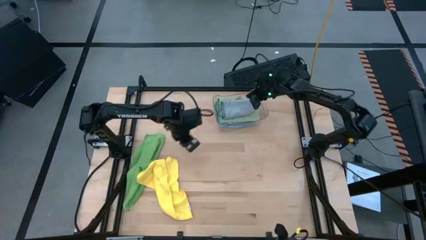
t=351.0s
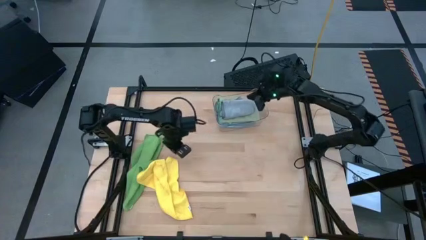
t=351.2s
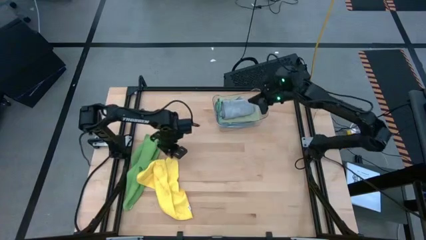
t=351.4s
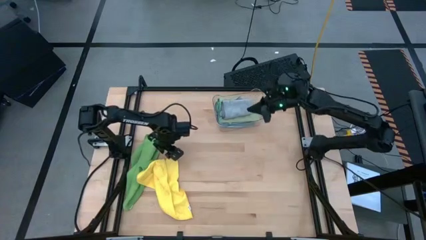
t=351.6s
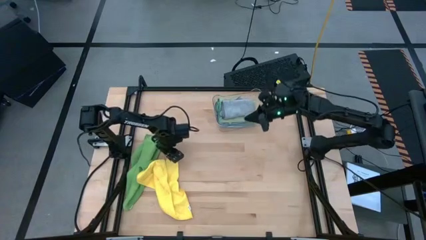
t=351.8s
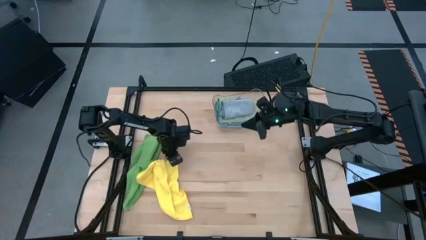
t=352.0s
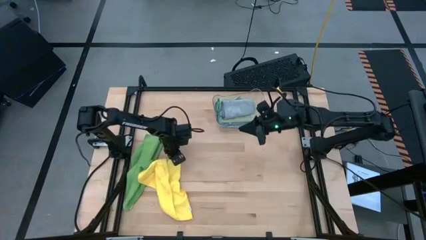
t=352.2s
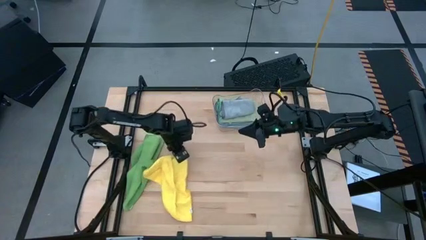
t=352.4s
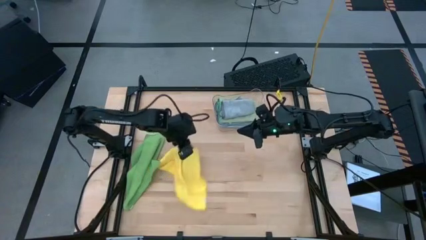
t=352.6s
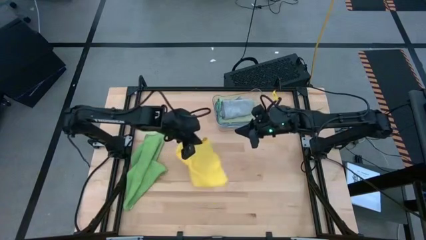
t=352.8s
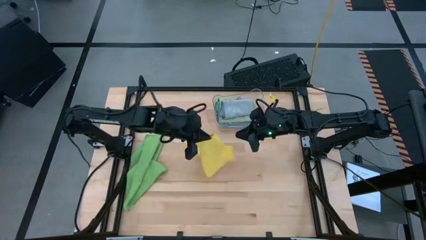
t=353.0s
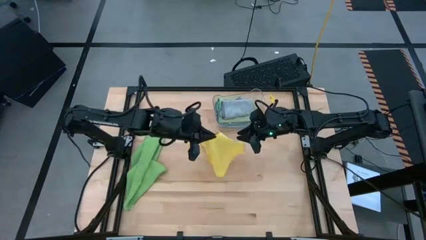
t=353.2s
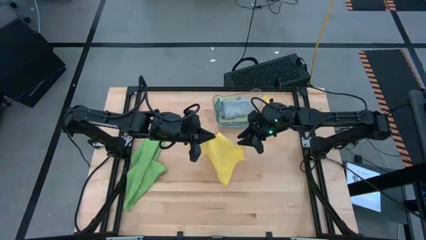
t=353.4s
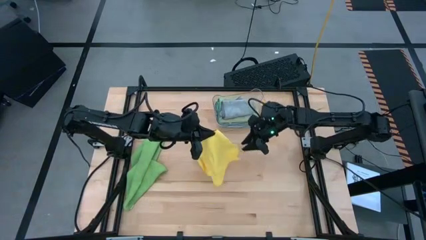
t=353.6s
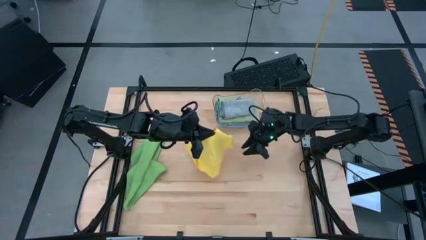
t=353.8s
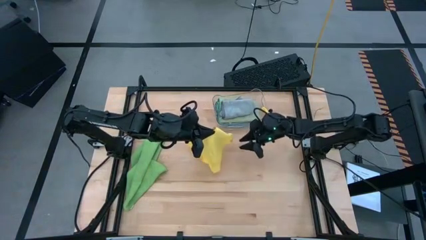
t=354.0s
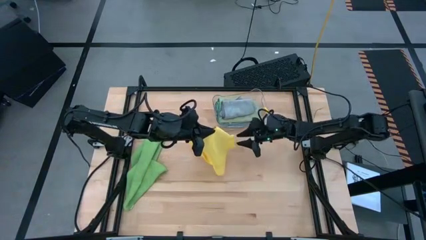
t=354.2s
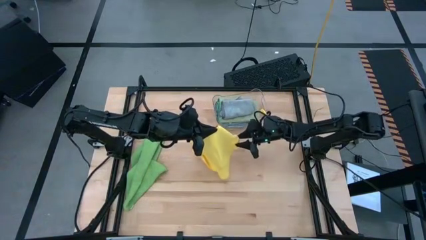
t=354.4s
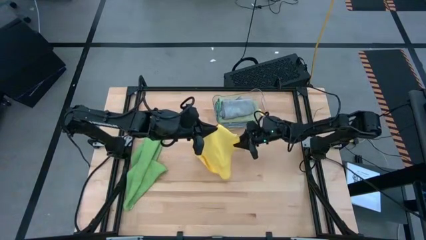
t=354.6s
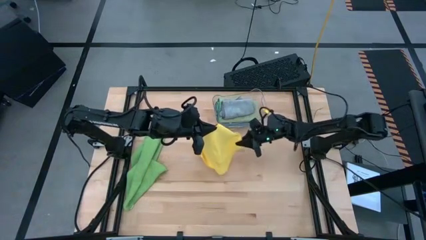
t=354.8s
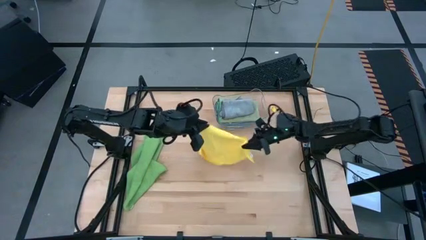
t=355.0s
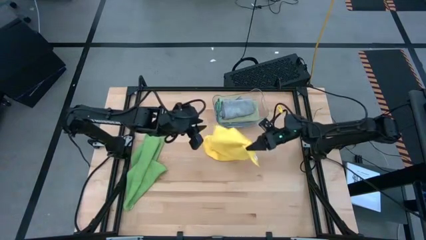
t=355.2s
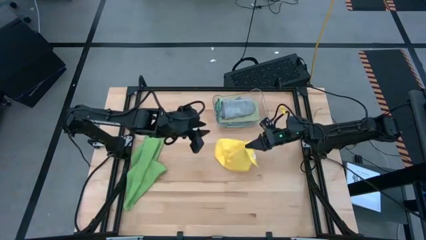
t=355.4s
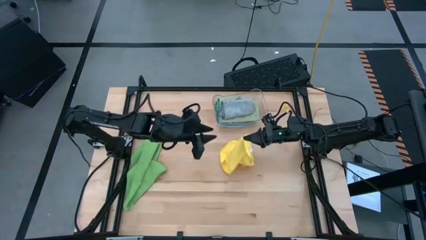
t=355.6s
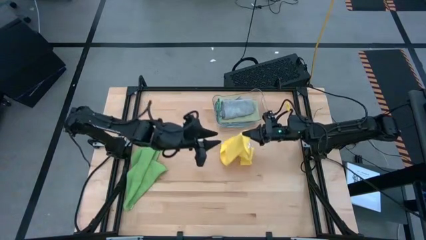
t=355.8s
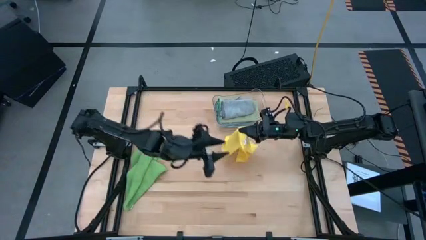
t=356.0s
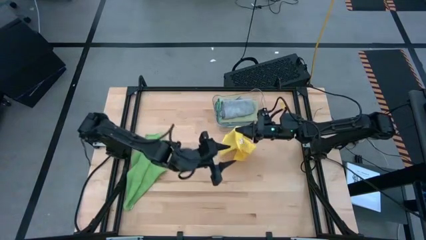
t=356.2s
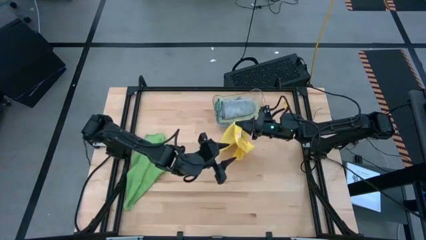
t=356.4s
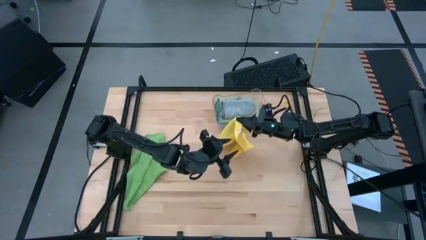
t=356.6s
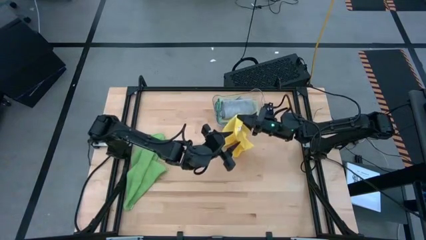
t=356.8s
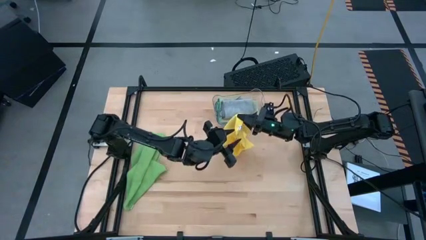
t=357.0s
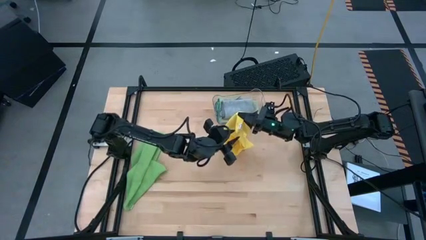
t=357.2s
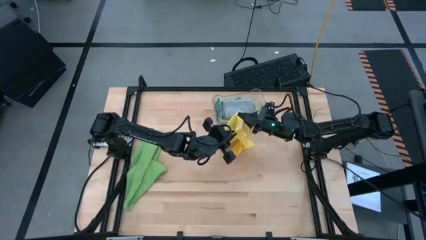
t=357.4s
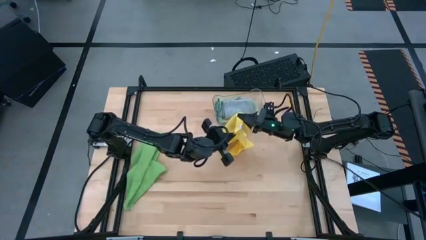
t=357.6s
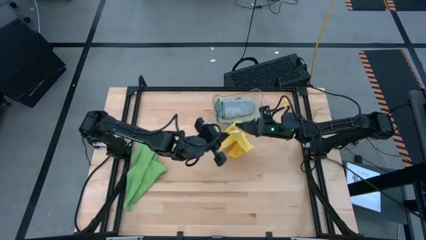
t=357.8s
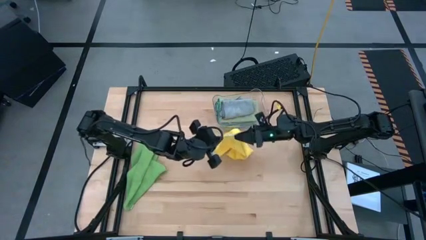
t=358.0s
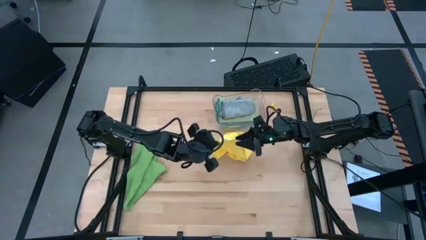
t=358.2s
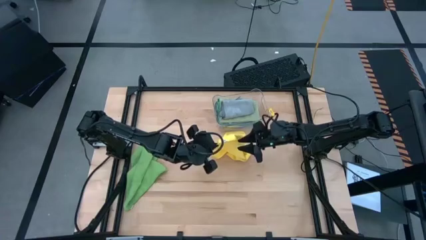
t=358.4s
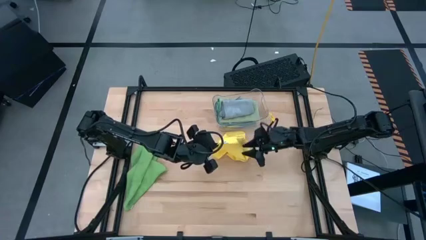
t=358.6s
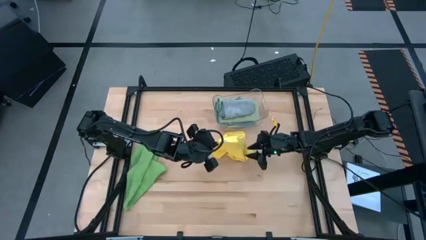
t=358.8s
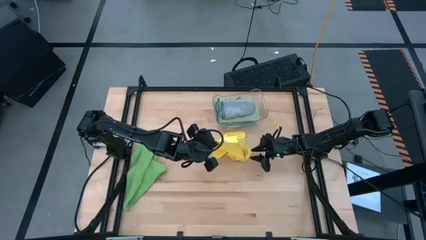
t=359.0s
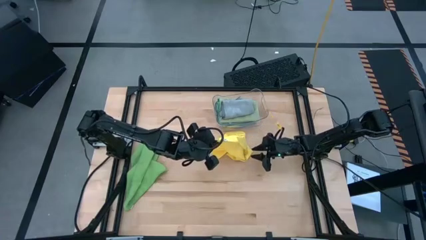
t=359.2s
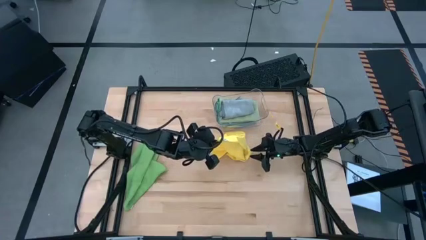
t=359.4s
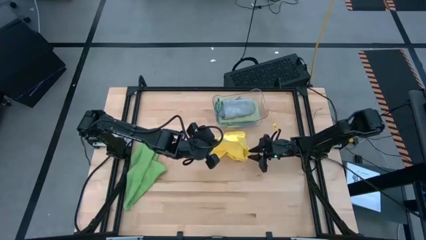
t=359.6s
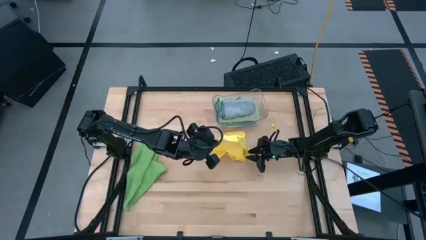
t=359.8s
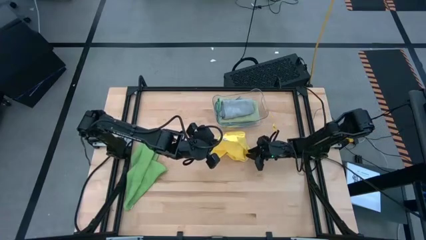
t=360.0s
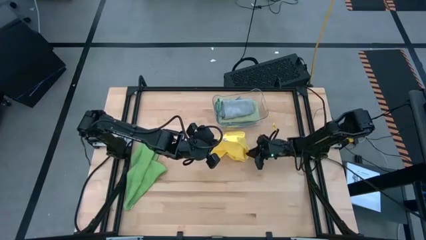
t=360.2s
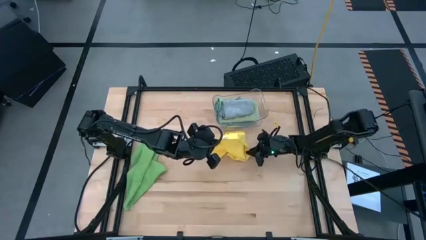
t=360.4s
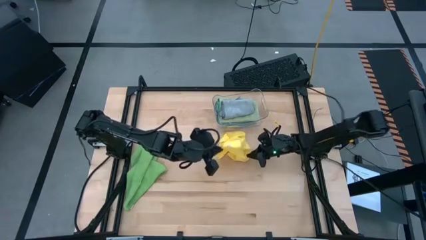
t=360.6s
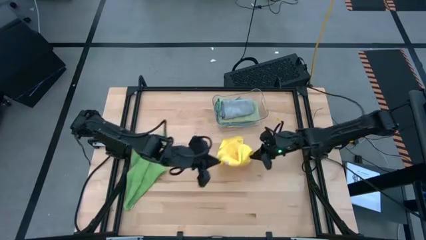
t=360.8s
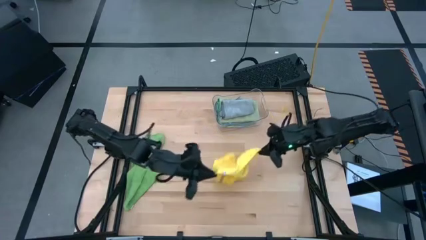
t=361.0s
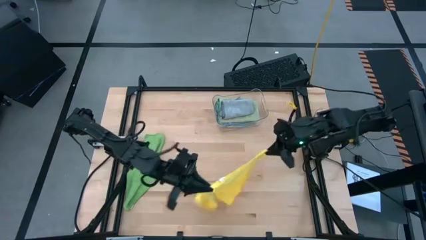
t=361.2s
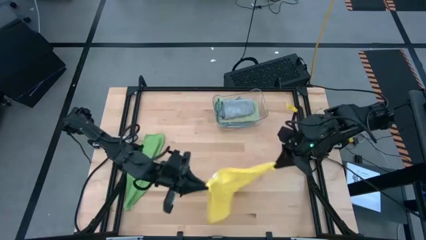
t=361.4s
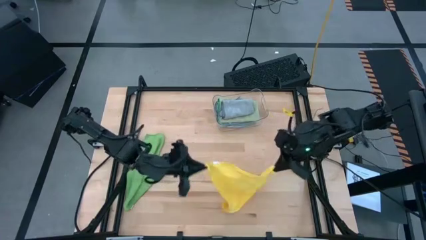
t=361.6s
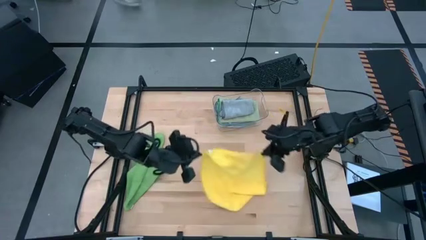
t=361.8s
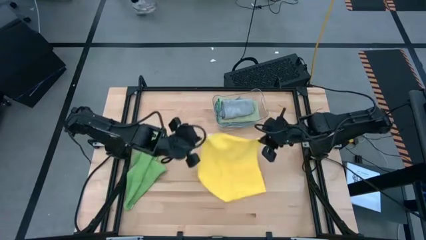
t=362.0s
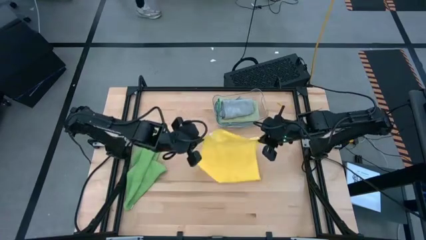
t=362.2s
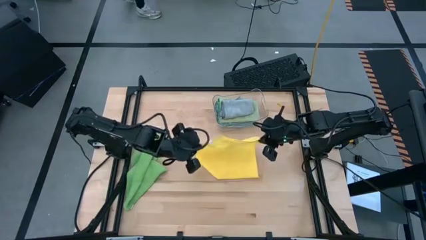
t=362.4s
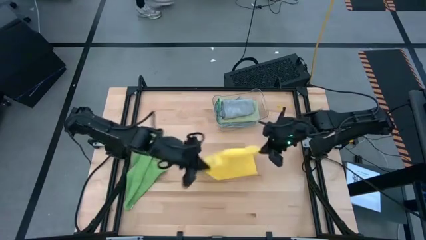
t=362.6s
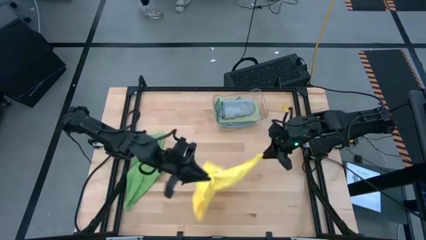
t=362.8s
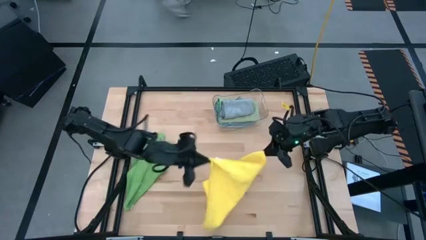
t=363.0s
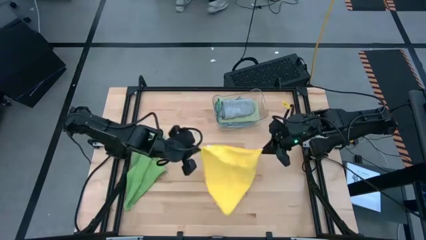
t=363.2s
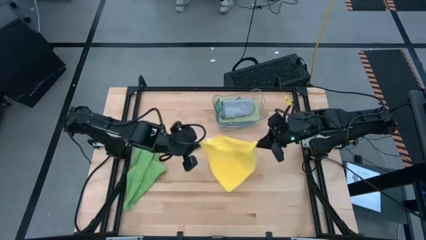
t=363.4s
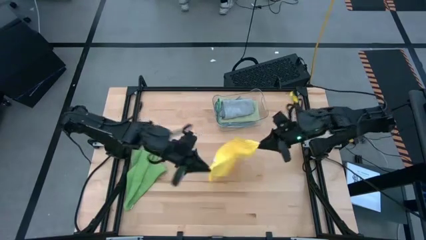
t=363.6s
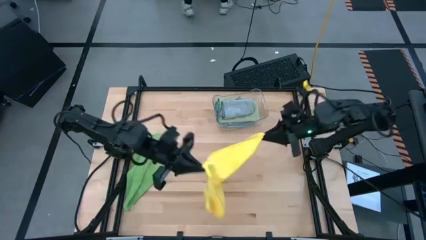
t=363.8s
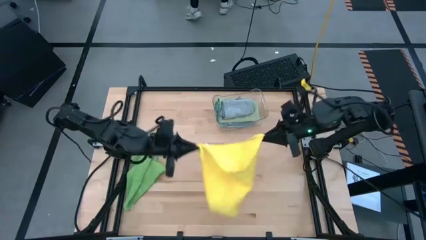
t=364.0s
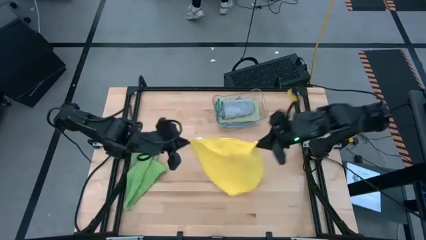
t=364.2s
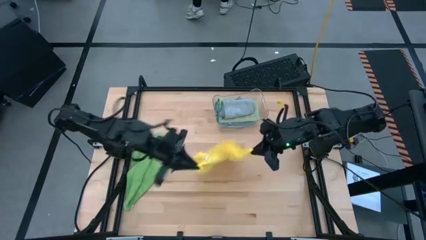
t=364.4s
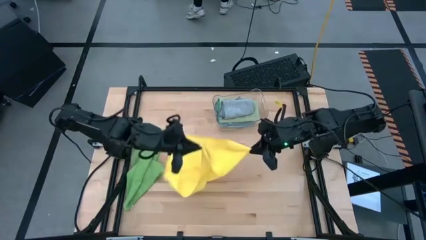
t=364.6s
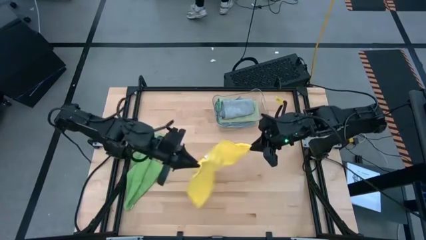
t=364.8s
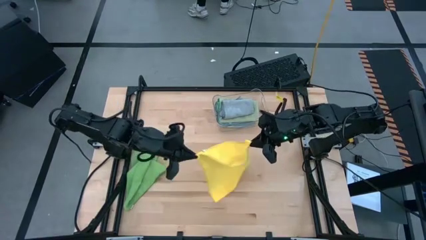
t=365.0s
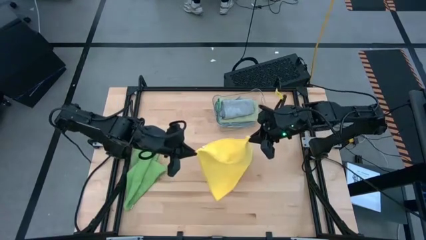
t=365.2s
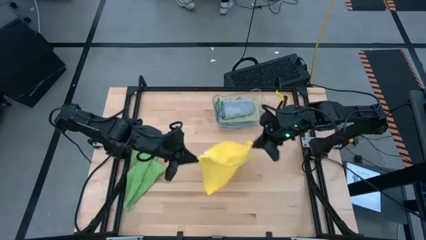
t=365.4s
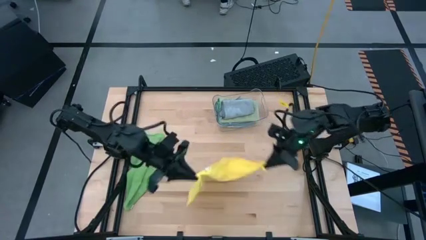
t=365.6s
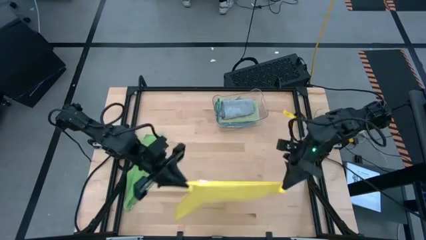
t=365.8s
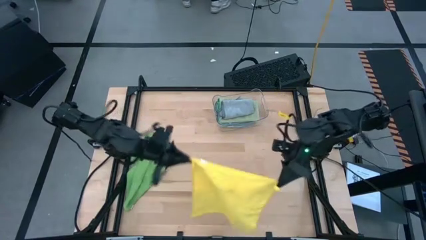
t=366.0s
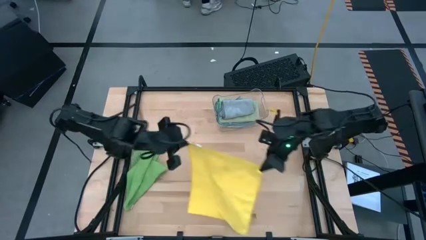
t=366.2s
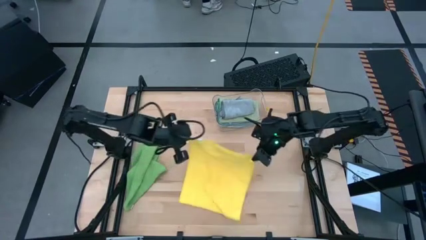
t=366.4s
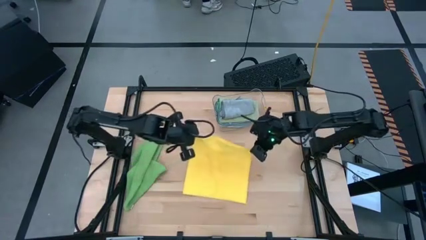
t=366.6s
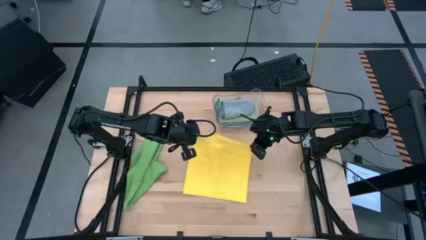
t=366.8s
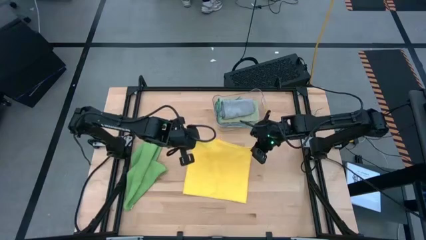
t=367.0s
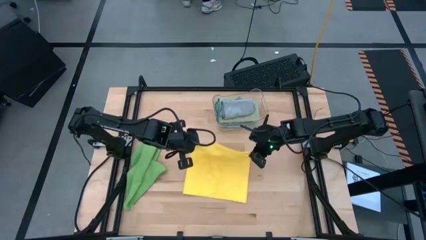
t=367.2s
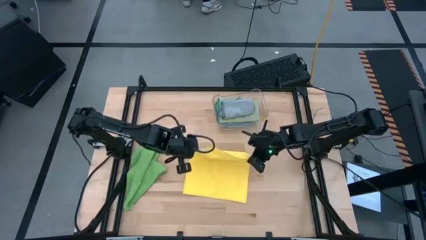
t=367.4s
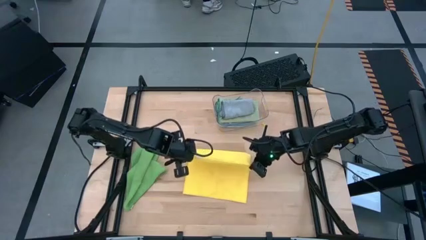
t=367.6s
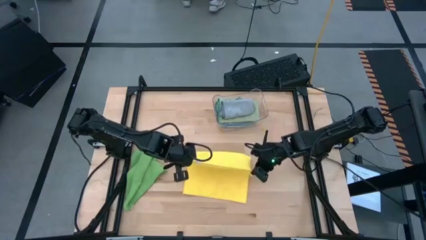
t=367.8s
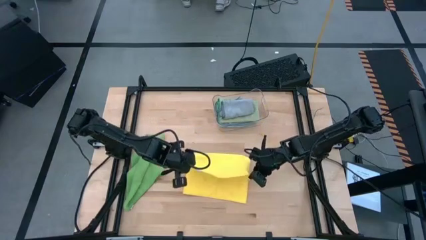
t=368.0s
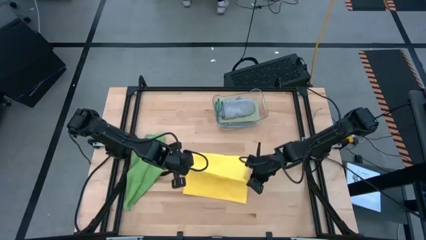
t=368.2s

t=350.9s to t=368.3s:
Task: Fold microfiber towels
Fold the yellow towel
